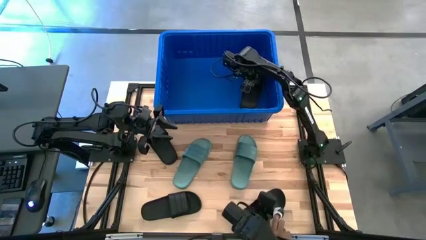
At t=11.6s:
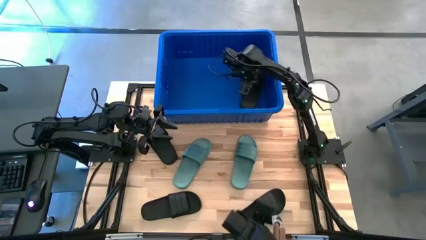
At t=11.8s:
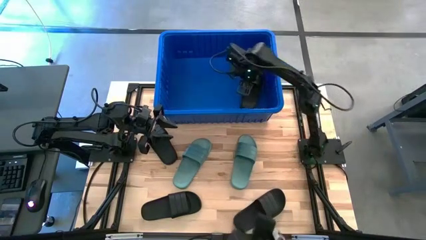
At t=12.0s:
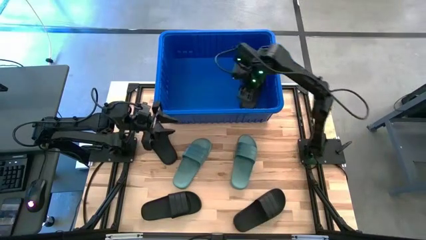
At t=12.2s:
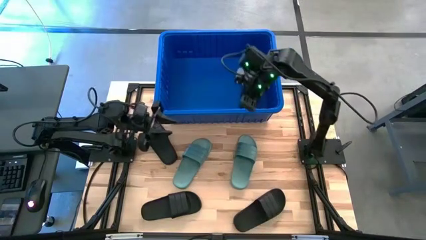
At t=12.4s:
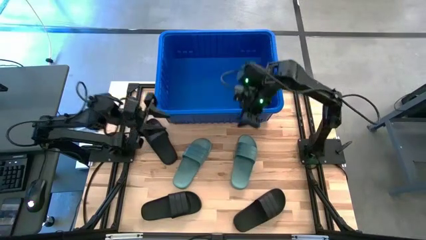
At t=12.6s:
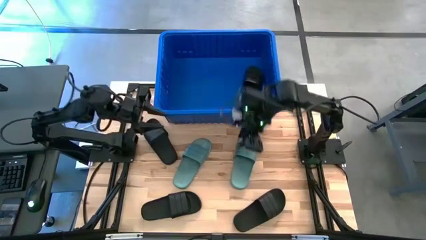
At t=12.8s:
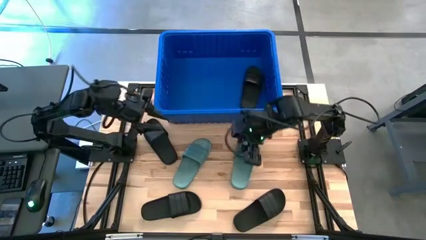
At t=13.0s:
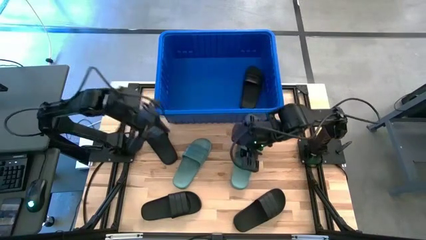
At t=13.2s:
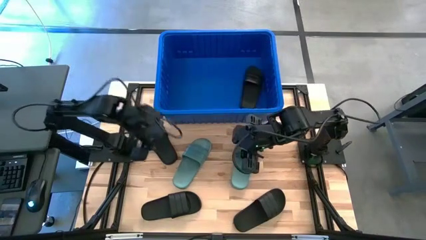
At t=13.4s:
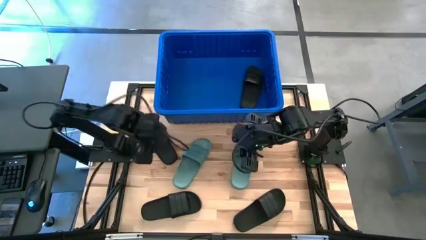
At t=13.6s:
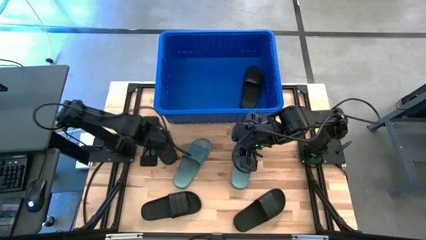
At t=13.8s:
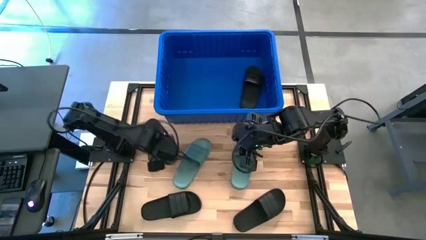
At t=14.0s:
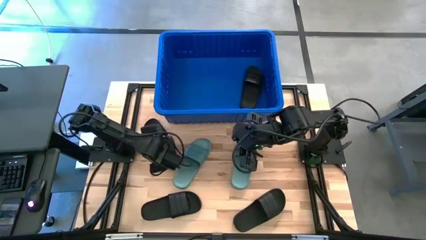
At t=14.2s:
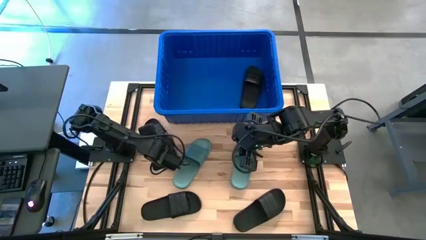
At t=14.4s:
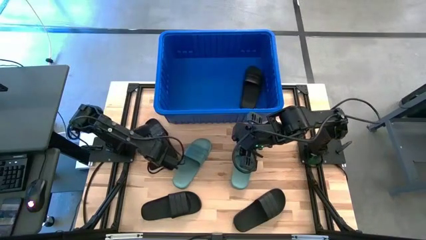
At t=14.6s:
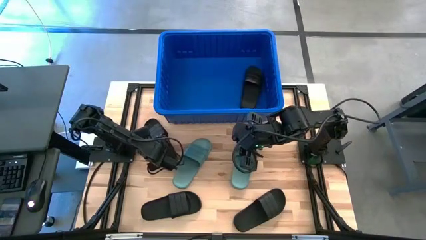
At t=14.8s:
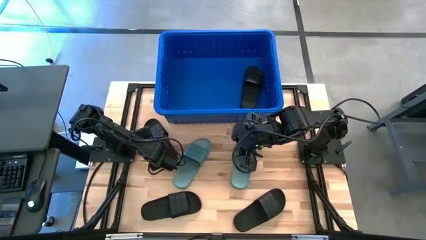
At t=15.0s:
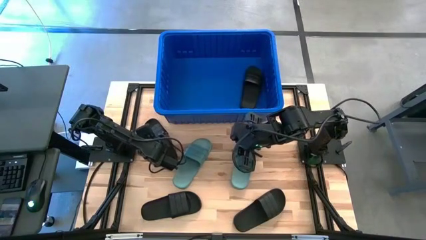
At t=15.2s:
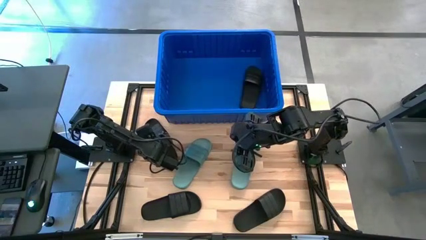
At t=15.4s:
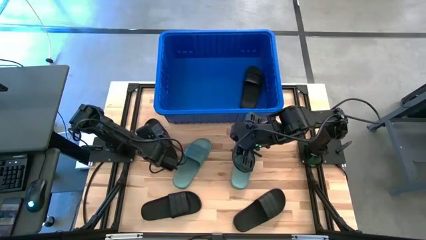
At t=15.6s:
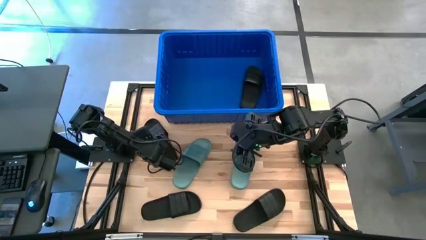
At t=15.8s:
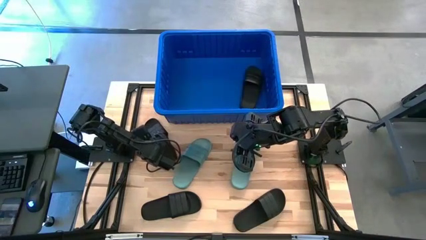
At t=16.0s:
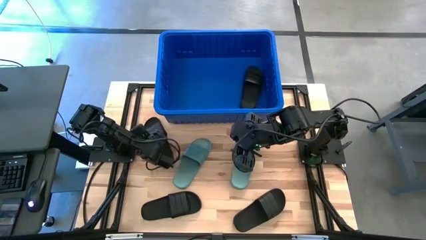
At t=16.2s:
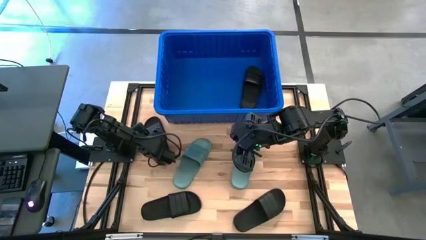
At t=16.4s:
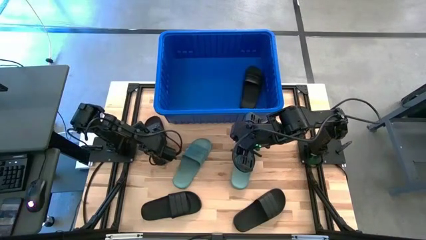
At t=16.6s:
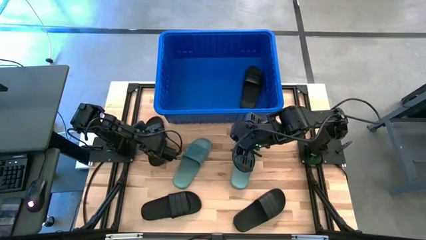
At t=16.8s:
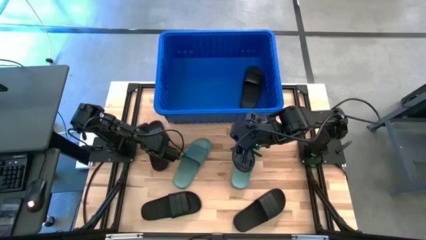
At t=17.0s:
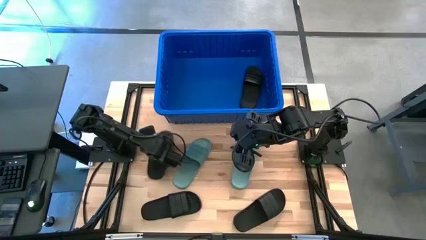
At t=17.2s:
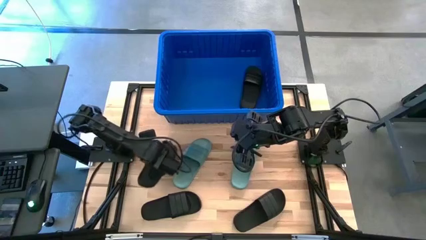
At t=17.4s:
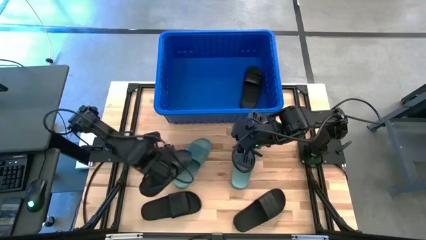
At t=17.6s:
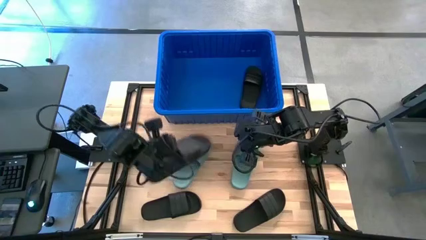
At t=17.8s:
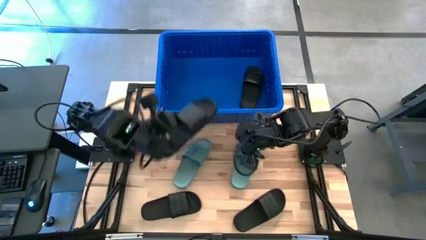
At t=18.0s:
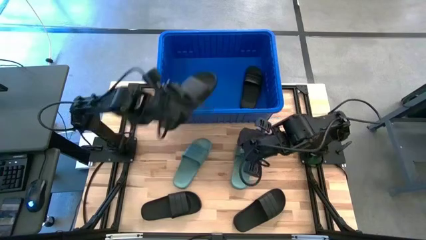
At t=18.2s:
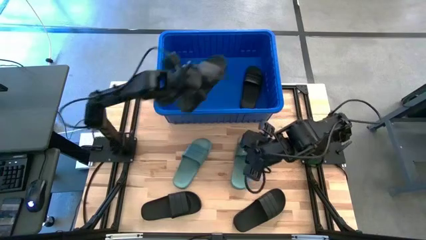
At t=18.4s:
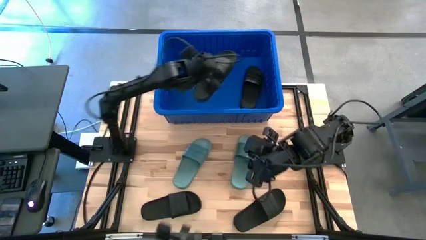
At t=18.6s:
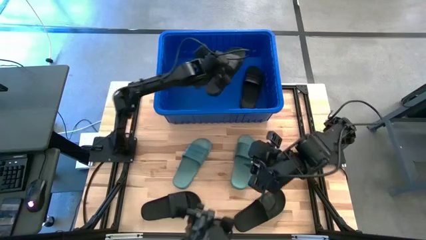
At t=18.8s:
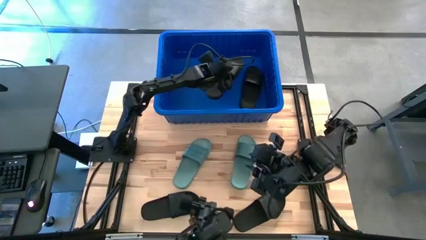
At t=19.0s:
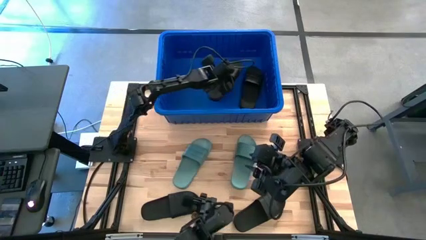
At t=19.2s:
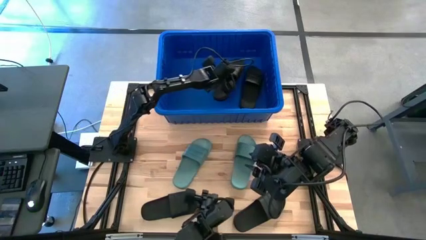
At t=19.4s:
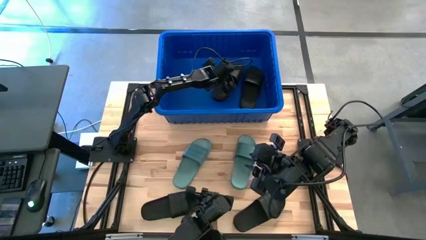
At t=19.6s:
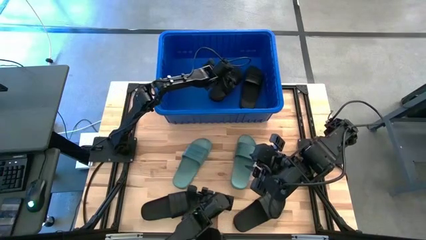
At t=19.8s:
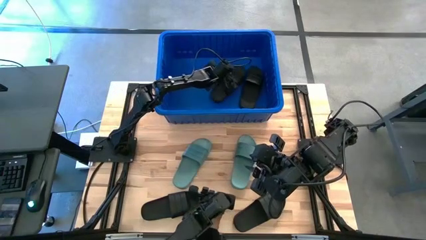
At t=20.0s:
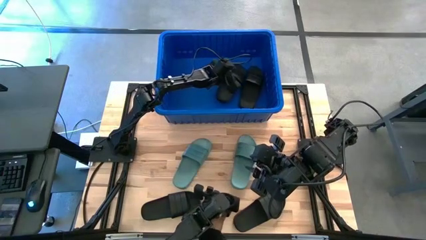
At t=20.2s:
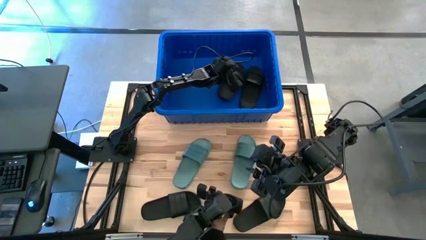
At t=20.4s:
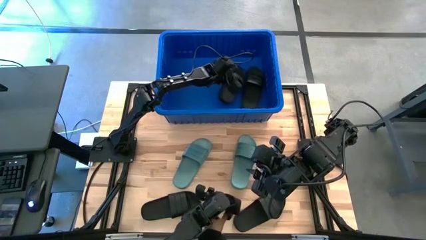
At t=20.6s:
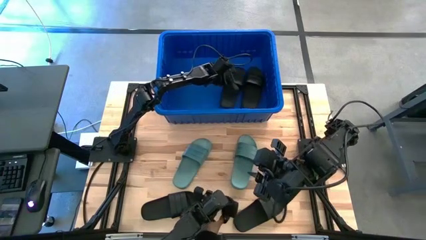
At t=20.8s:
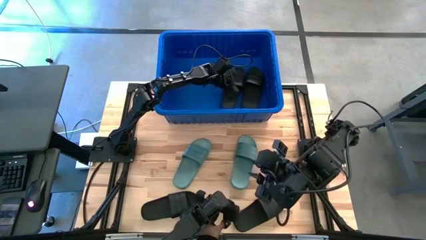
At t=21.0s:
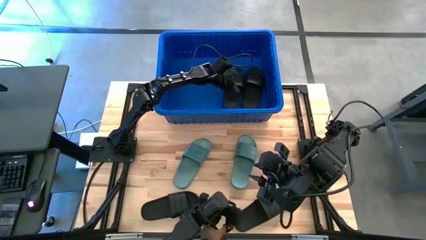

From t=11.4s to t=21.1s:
Task: Pick and place slides into bin
Put the top left black slide into the bin

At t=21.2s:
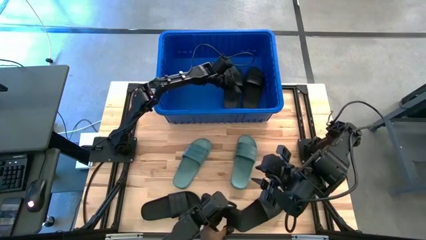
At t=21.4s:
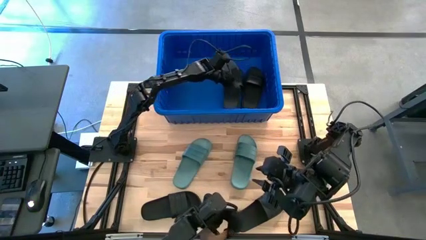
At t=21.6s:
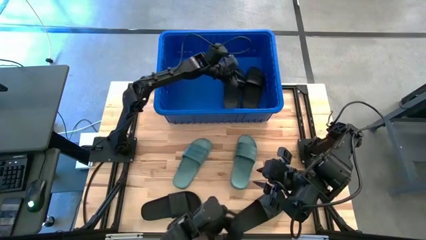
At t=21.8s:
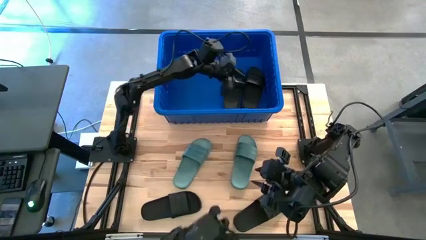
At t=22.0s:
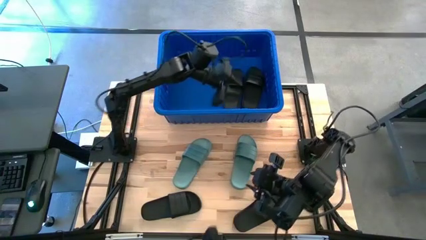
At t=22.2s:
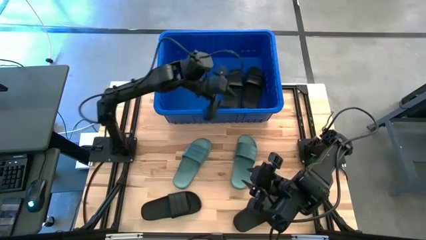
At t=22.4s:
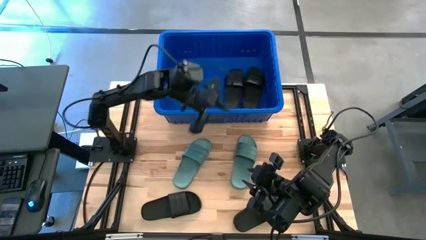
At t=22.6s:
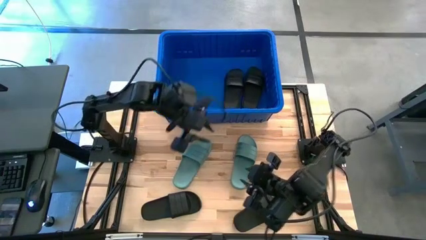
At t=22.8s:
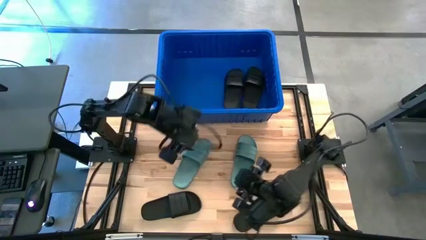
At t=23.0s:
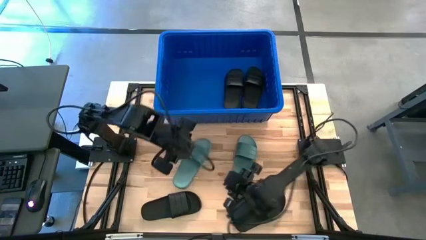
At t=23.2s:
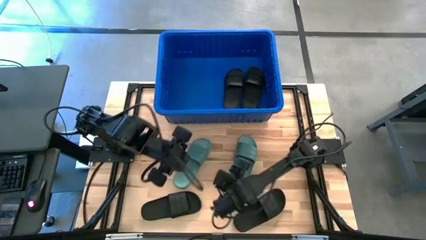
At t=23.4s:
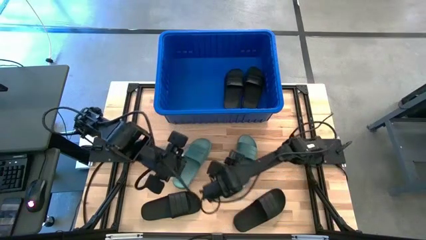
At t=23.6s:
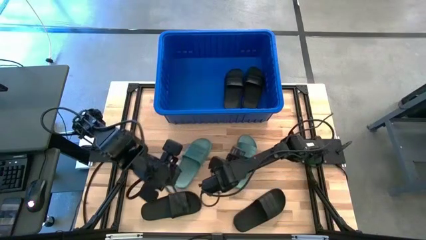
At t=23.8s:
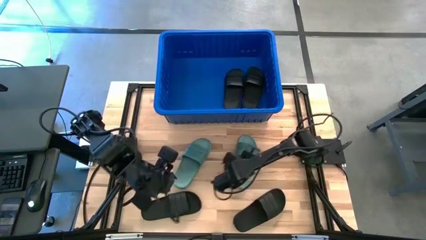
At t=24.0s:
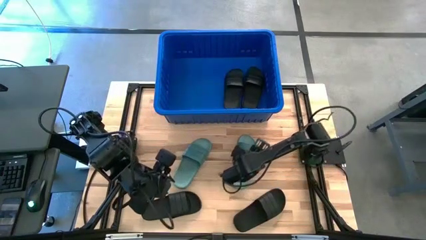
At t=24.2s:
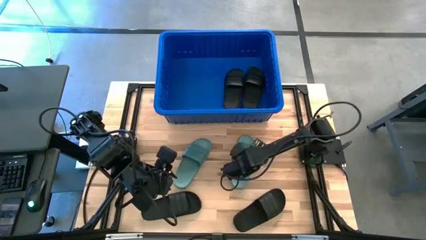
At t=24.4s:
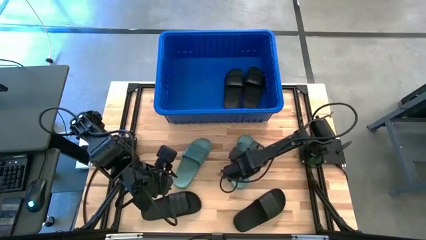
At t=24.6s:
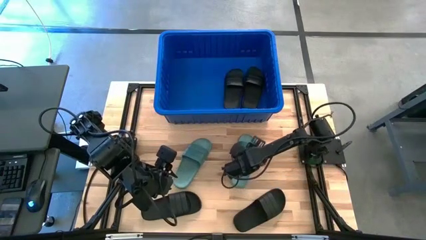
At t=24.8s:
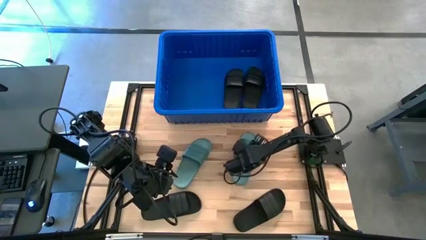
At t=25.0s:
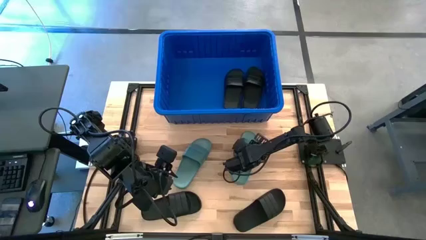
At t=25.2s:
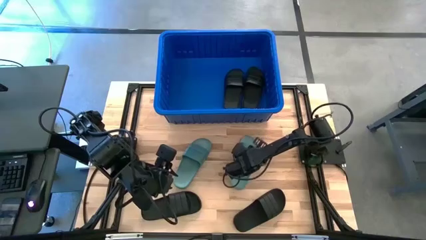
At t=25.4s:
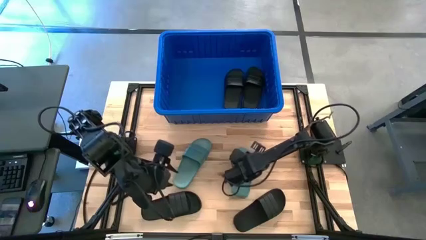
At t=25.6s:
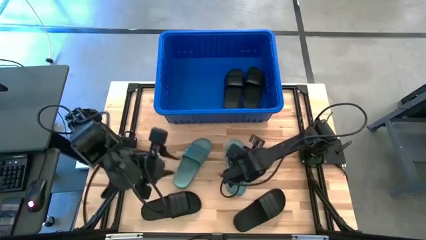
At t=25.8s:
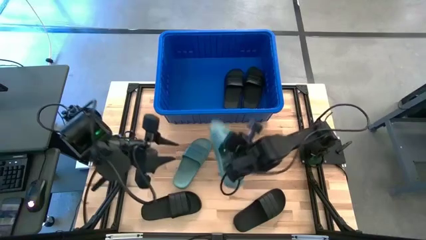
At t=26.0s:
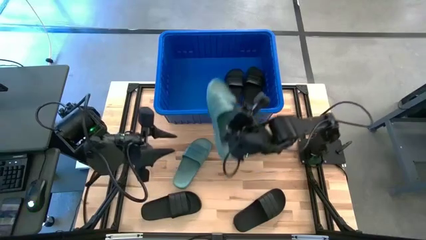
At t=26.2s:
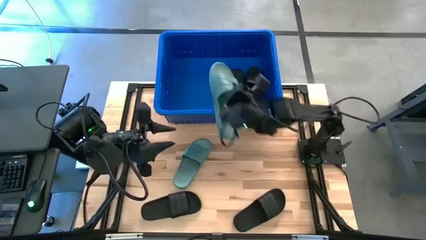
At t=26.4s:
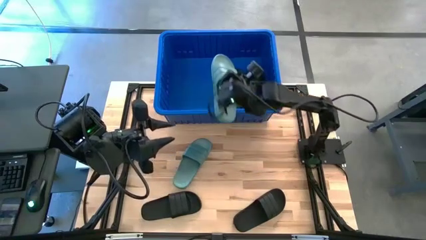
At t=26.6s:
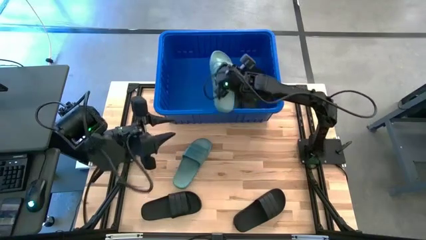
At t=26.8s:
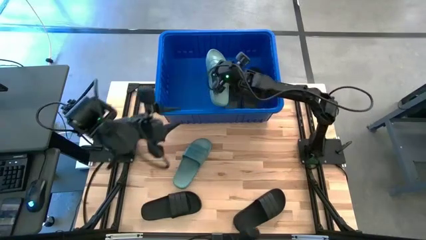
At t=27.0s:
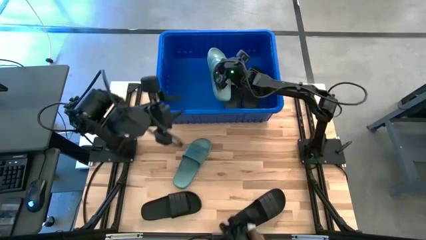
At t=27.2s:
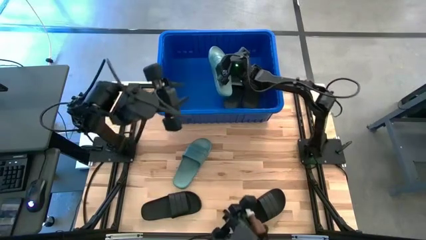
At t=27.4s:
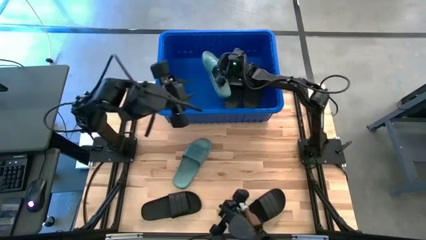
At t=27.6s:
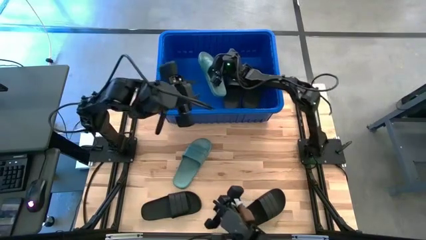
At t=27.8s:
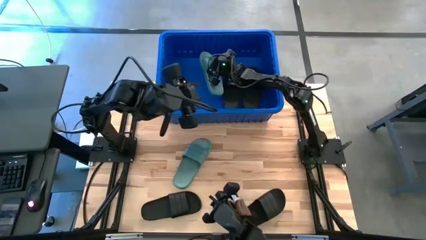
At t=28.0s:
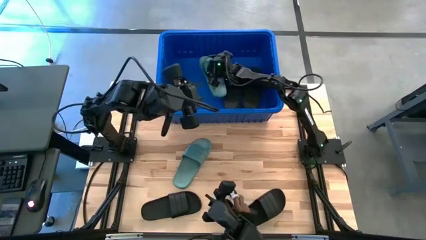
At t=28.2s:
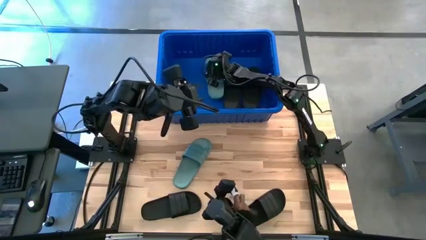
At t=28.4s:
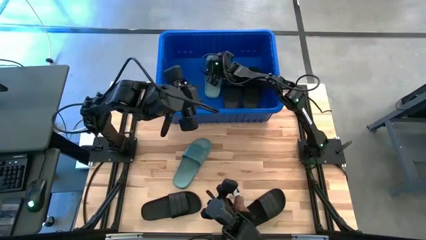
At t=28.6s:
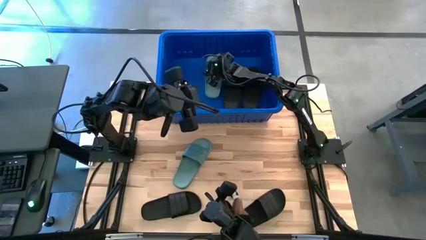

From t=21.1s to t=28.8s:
Put the right green slide into the bin
